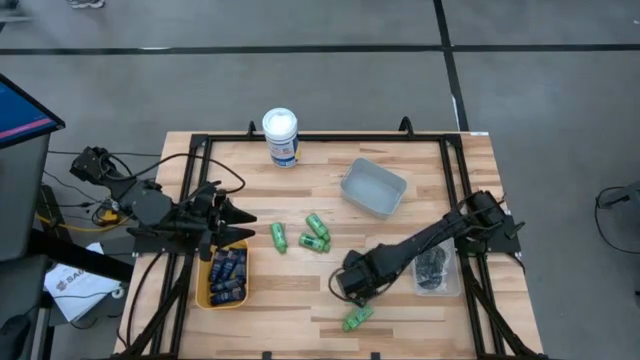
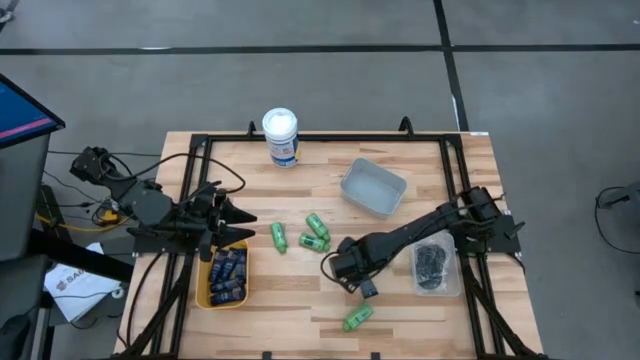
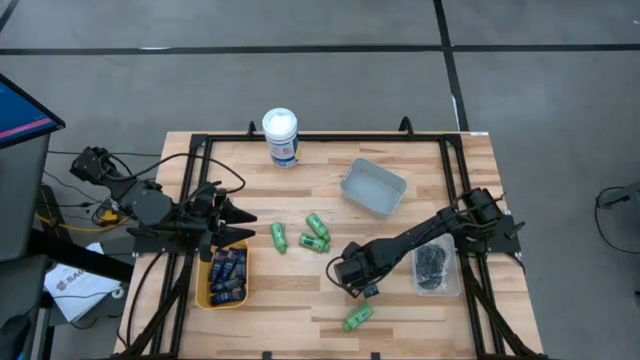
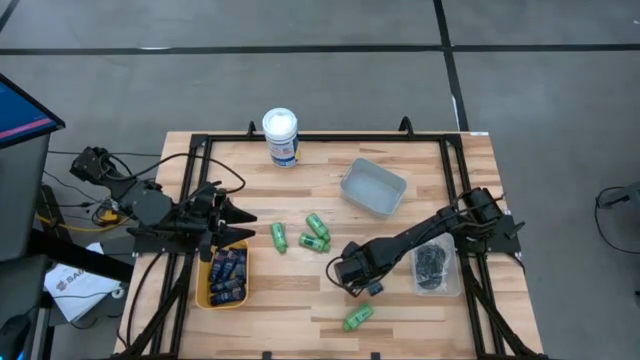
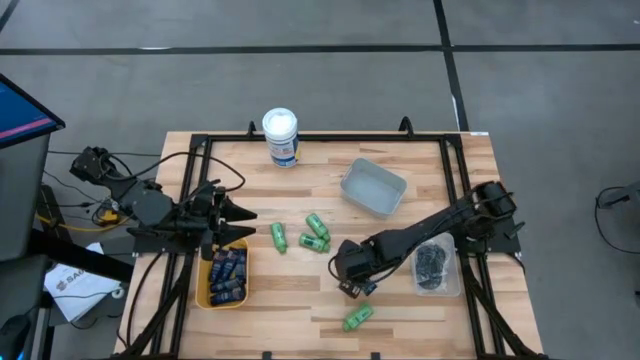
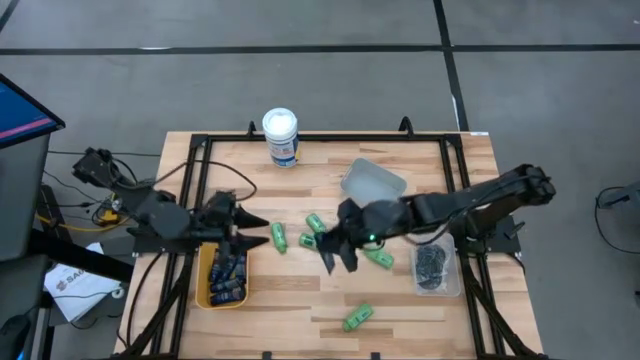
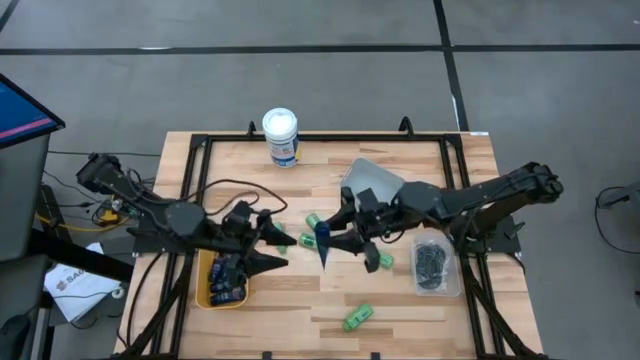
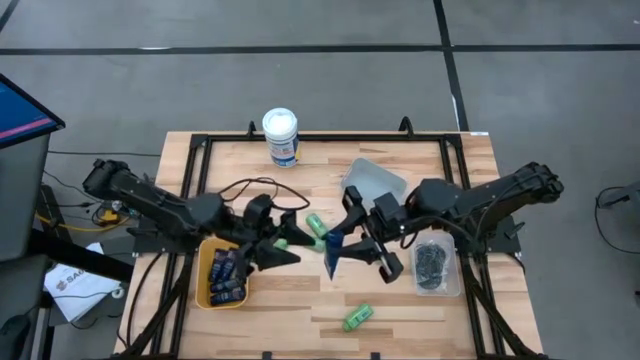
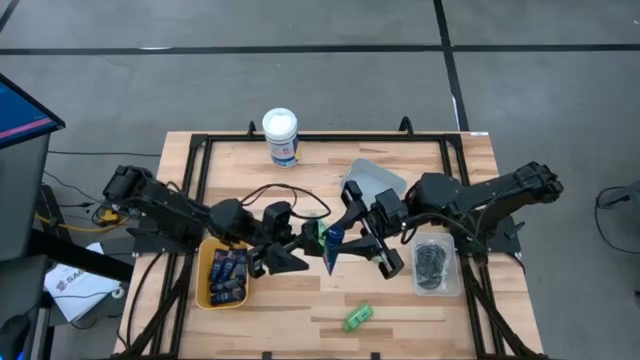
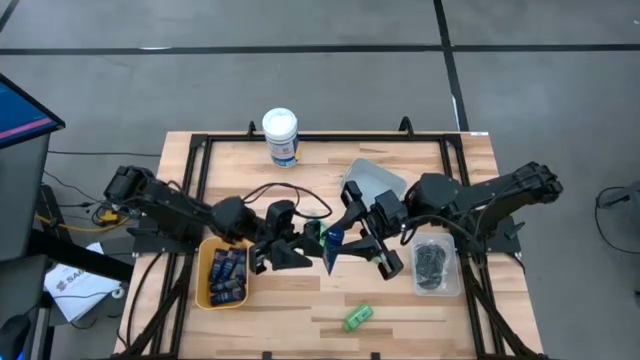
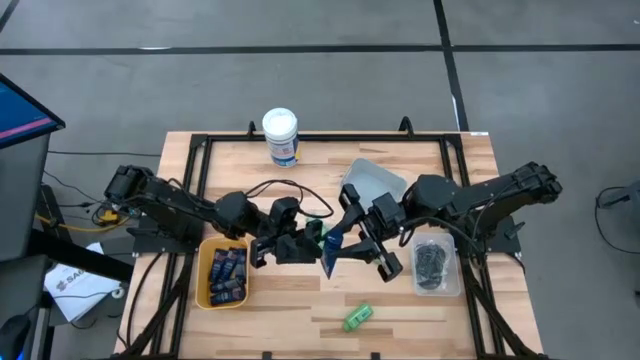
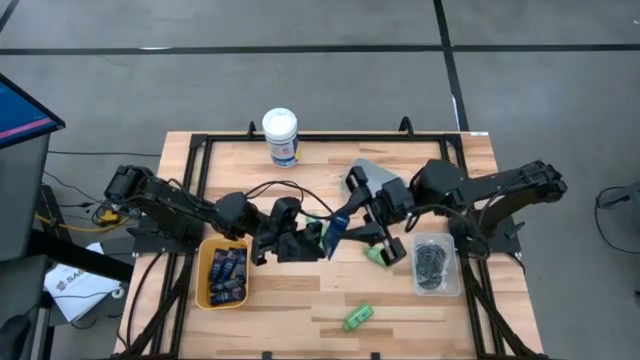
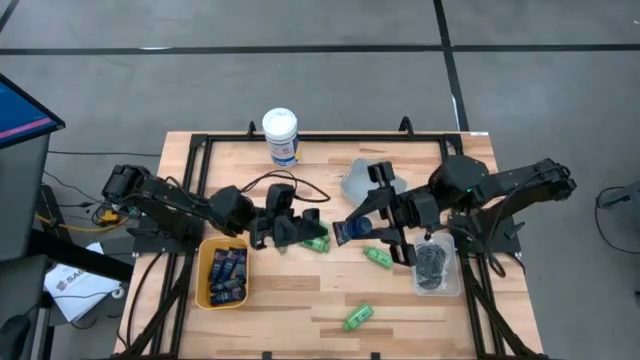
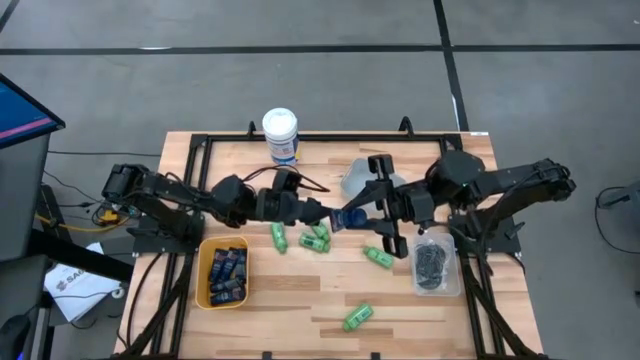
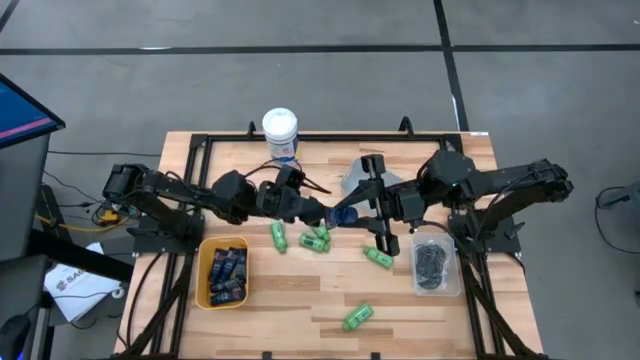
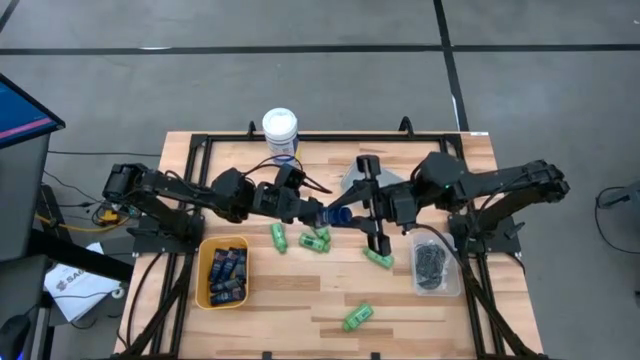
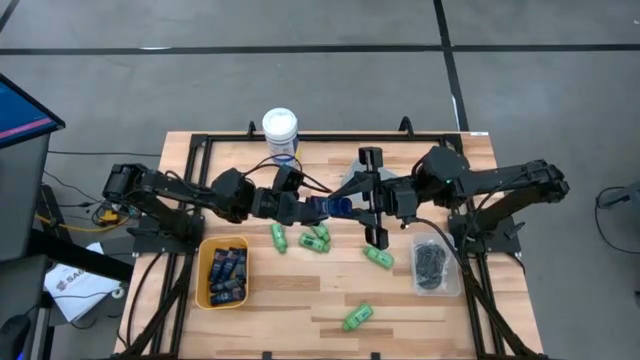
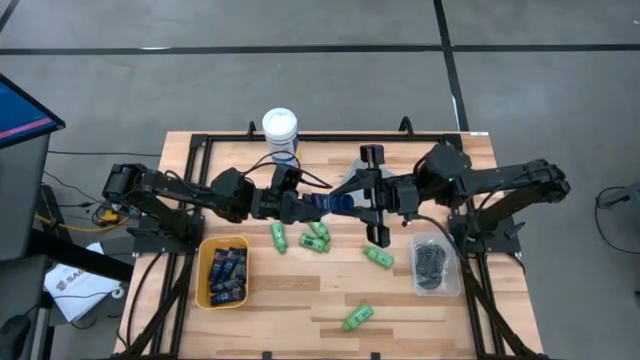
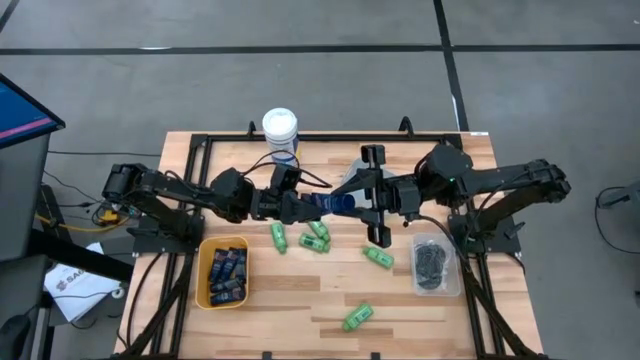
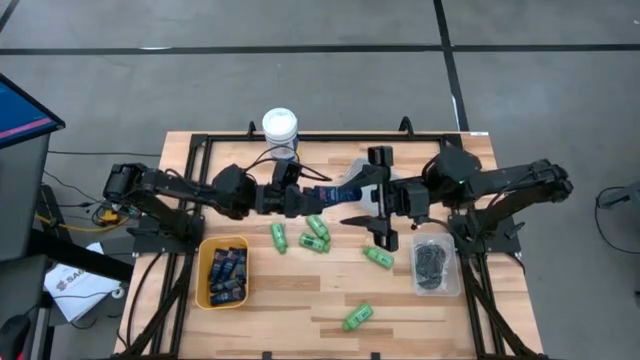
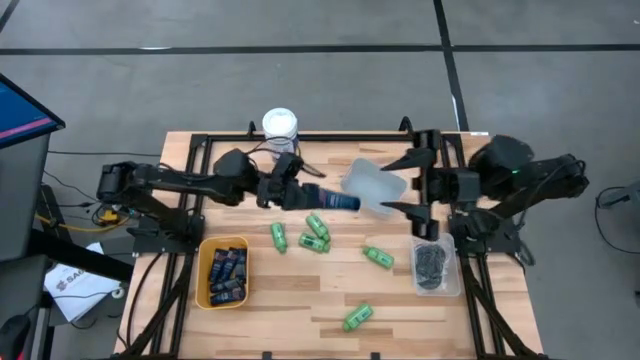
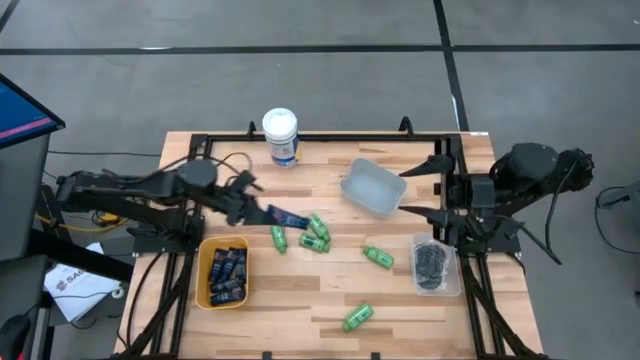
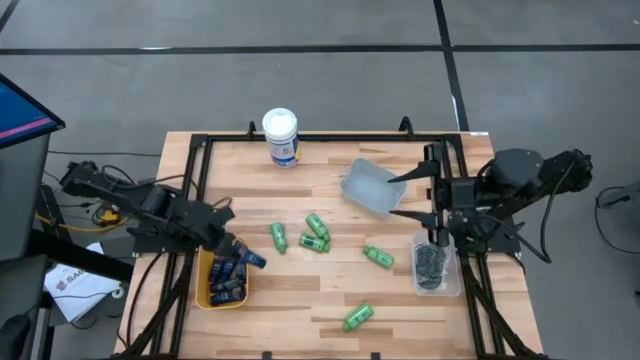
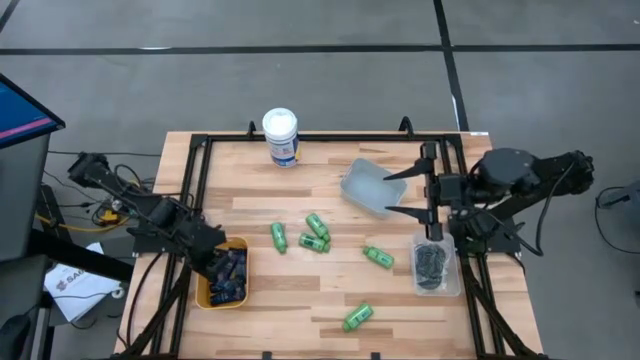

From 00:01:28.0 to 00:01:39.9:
Task: Pick & Place Travel size toiletries
Put the blue shave cream into the light orange bin

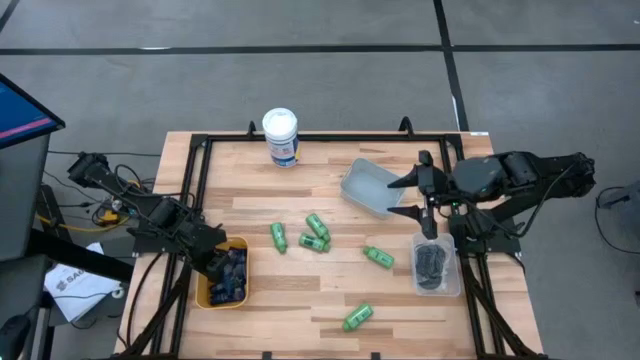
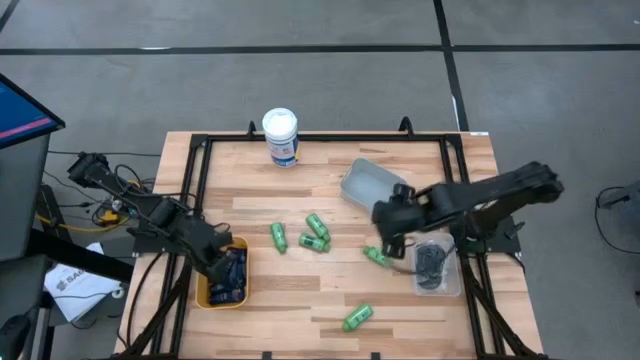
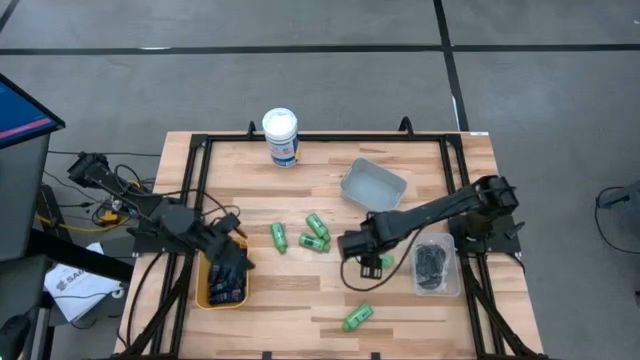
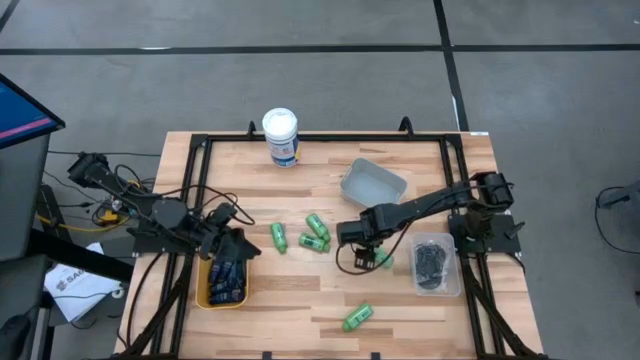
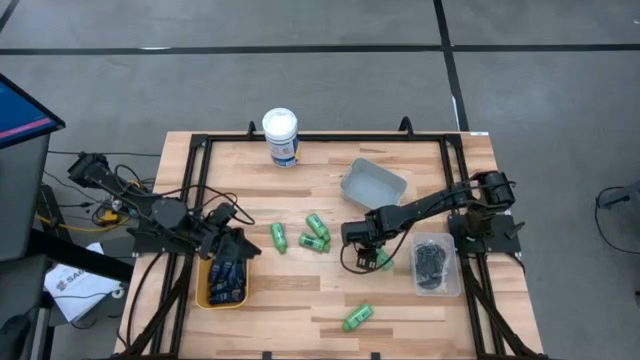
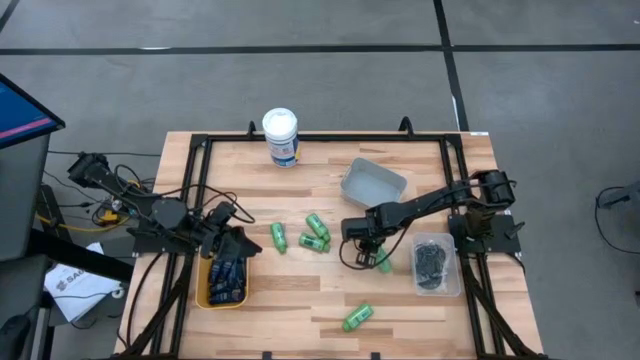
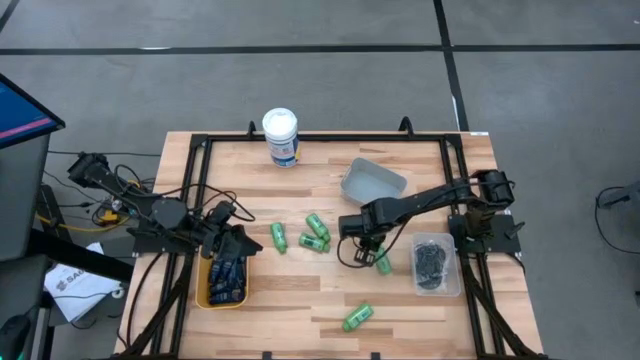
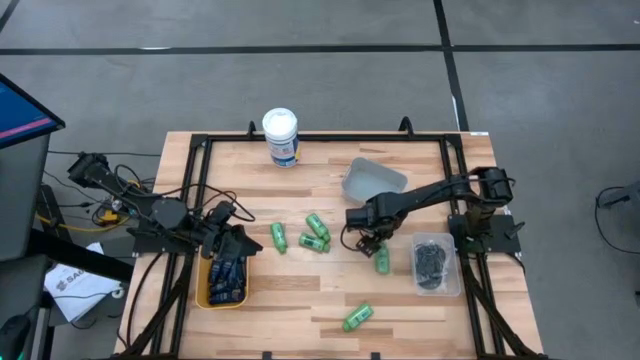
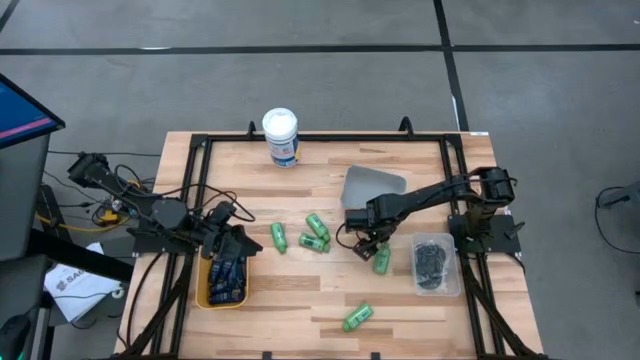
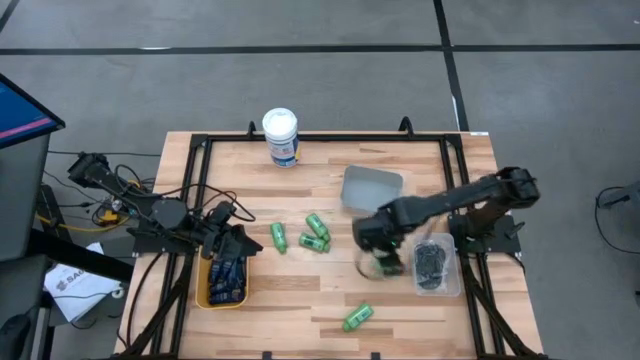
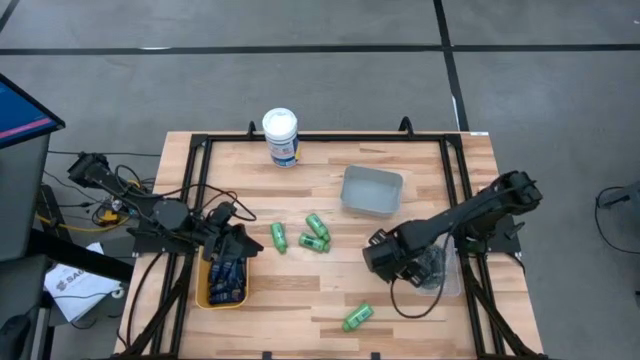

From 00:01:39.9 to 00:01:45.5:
Put the green shampoo into the gray bin

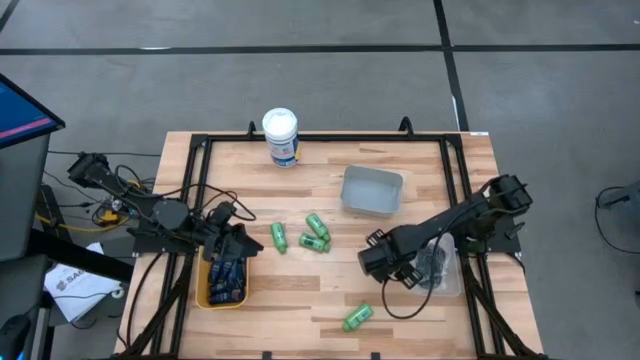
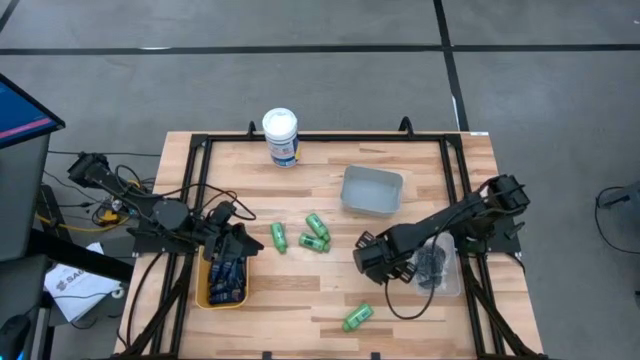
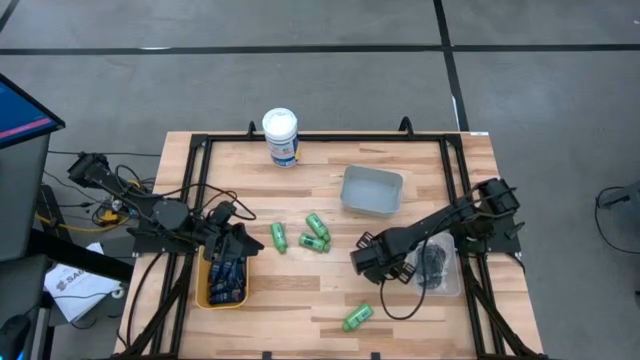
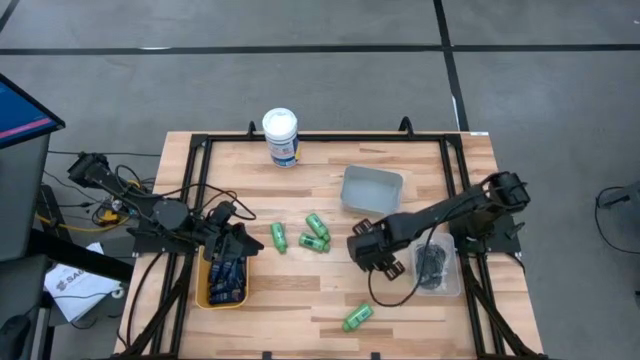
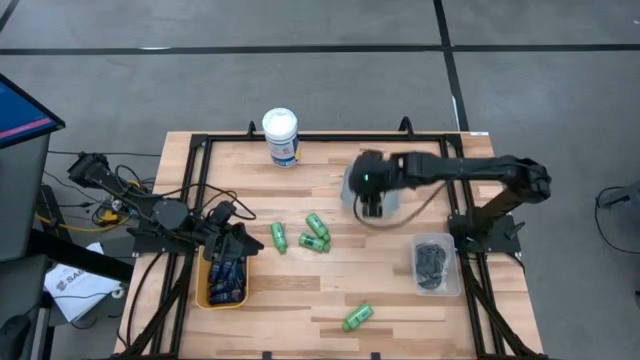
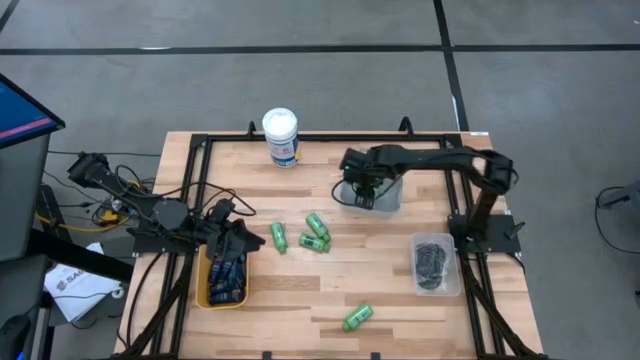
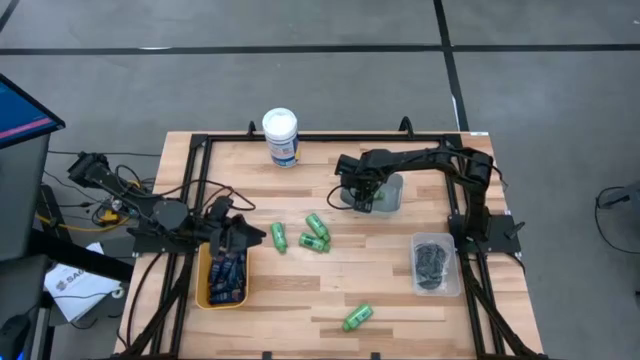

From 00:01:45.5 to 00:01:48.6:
Put the green shampoo into the gray bin

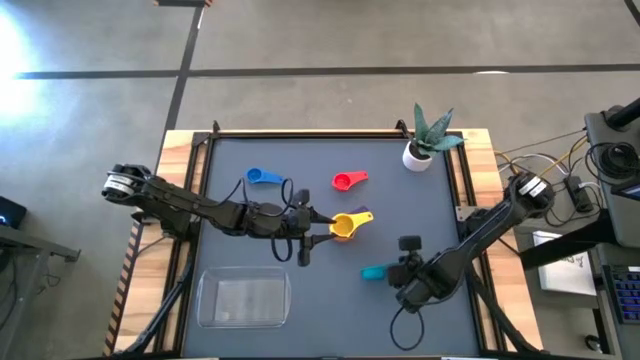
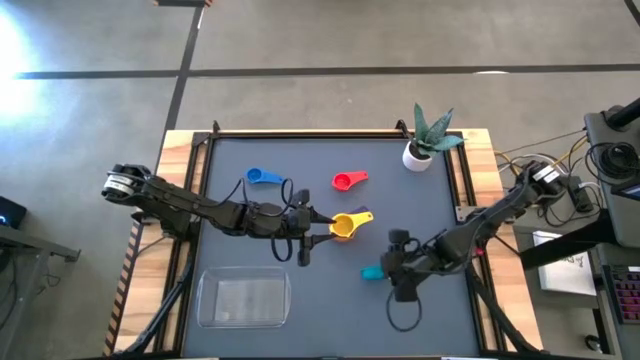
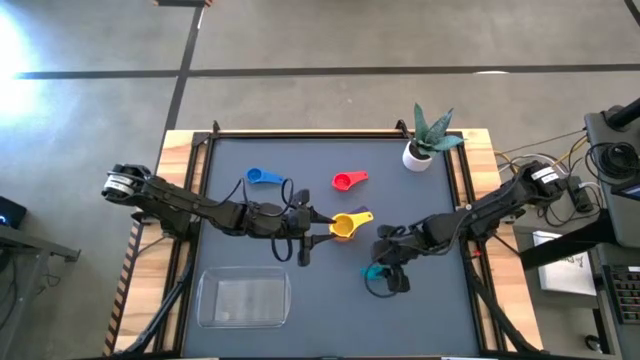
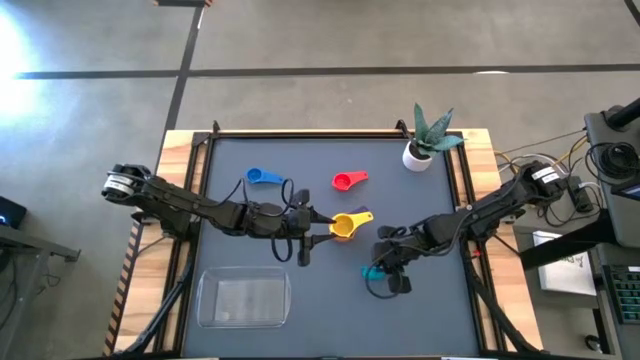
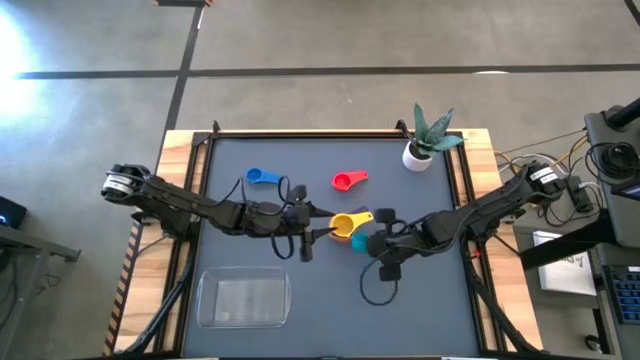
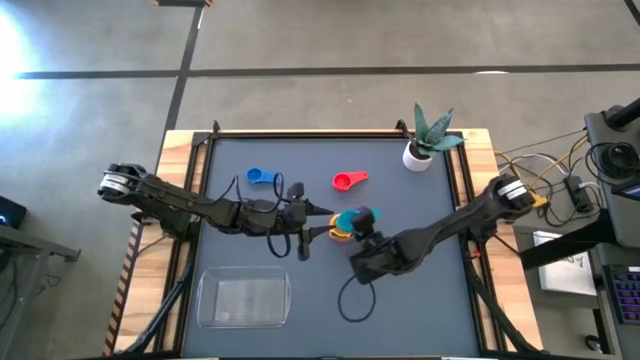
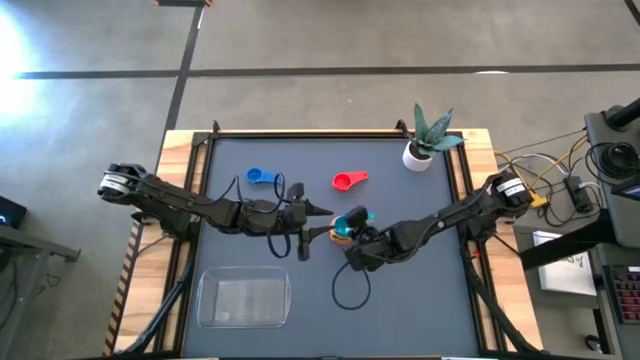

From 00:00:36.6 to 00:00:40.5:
Task: Nest measuring cups in basket
Stack the light blue measuring cup on top of the yellow measuring cup
